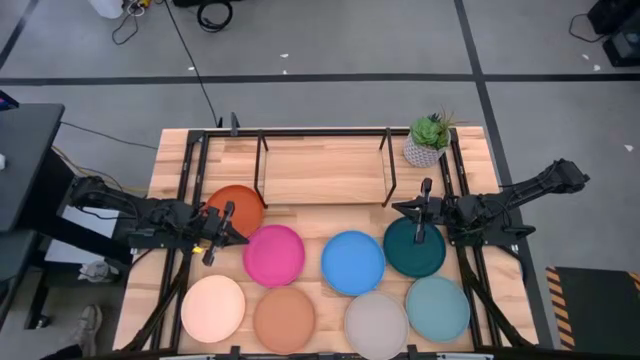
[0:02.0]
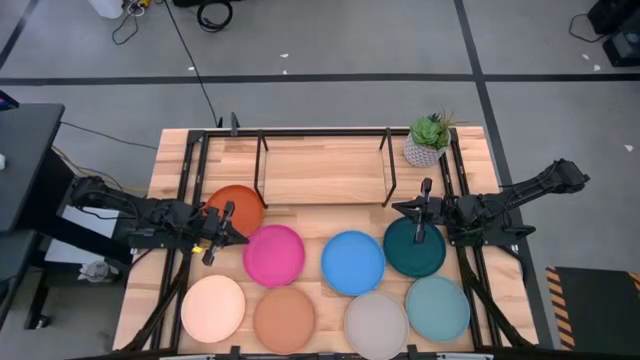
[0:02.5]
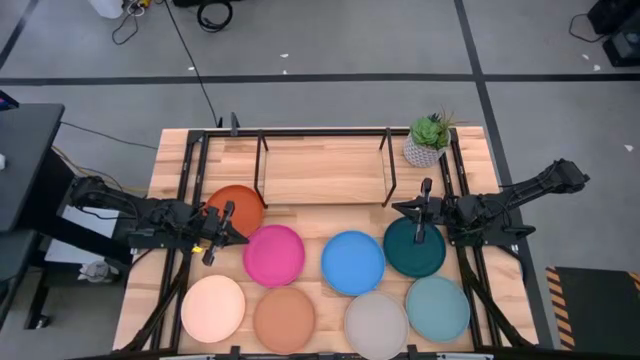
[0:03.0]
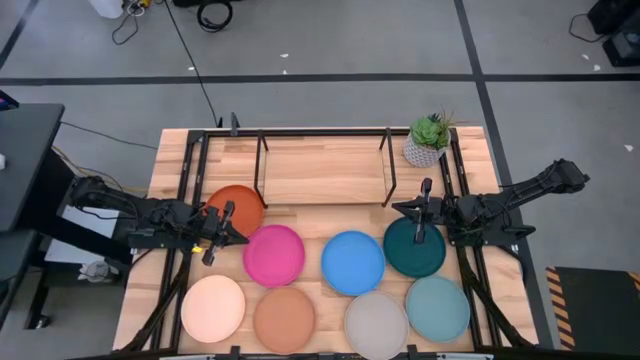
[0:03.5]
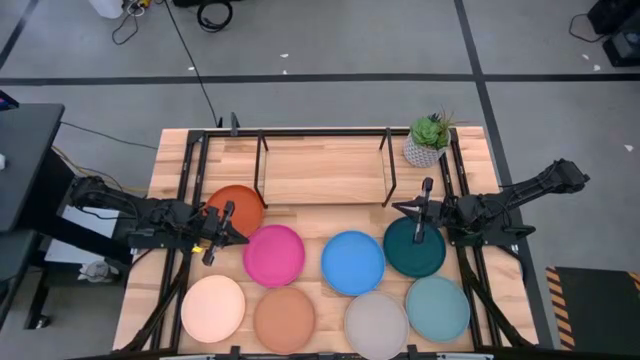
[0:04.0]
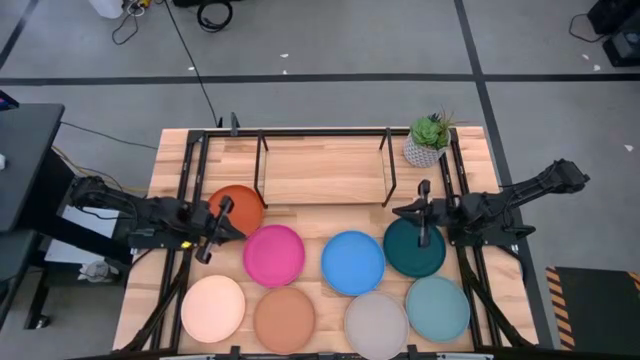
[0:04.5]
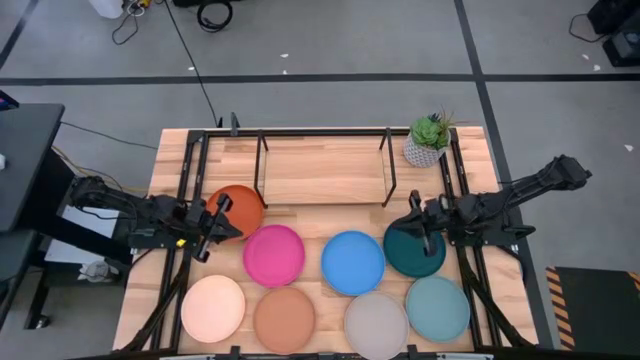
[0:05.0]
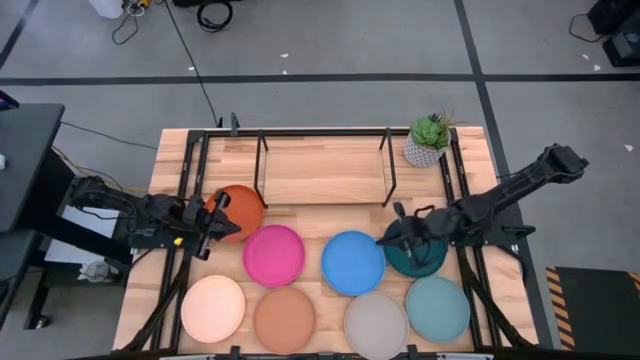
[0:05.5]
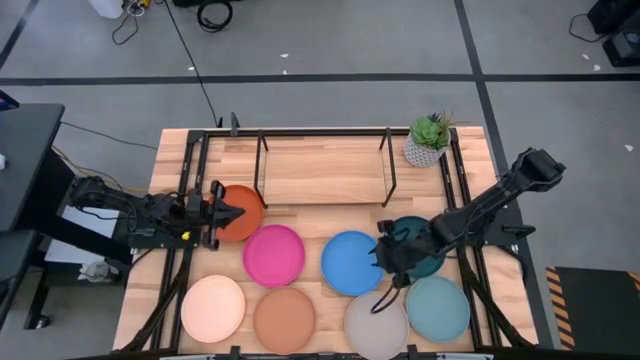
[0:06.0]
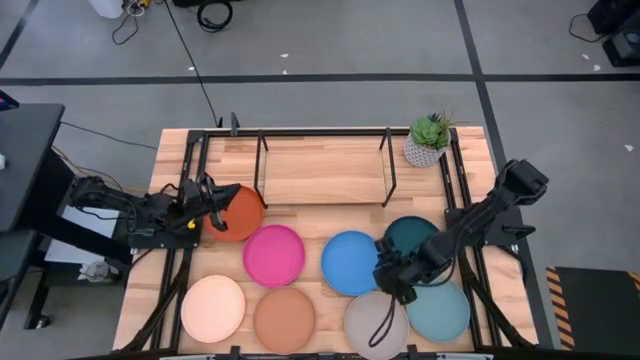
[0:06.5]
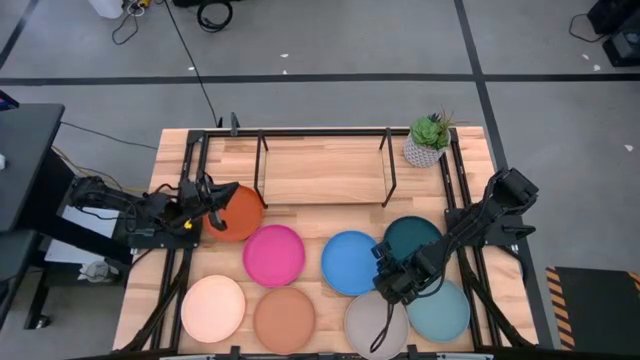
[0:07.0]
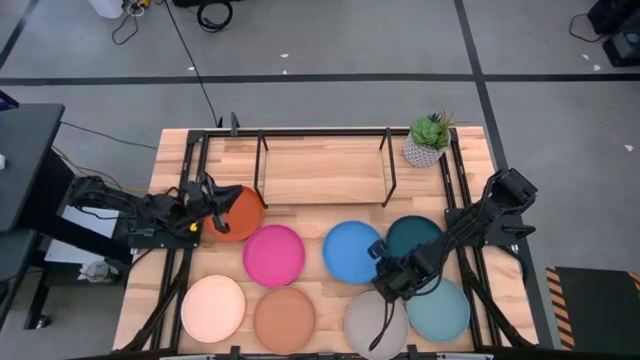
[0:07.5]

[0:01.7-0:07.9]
Task: Place and stack plates onto a shelf
Put the blue plate on the shelf

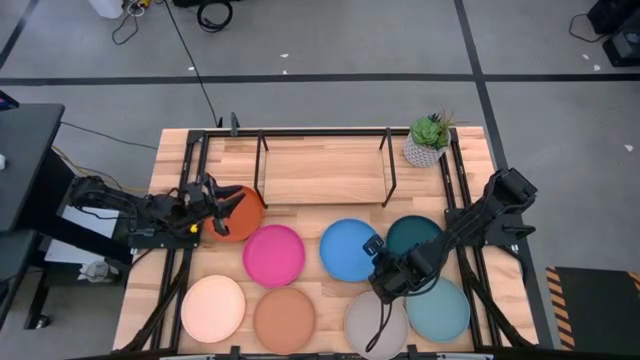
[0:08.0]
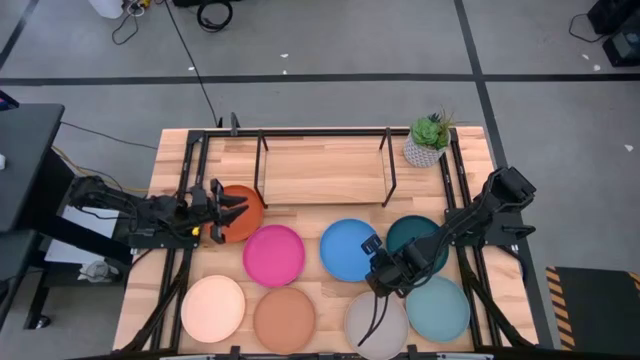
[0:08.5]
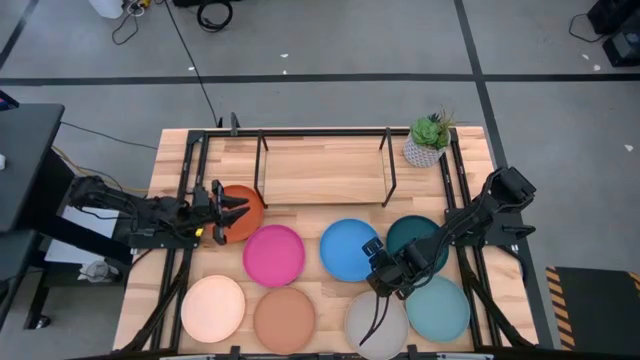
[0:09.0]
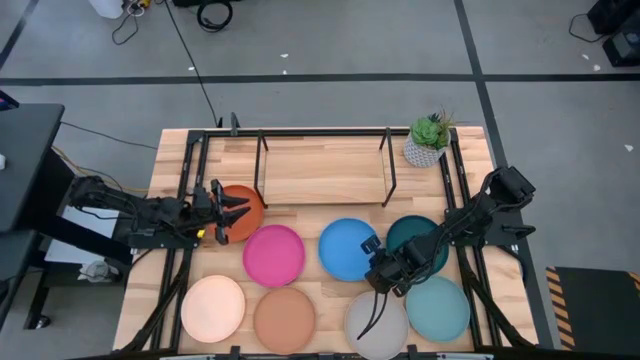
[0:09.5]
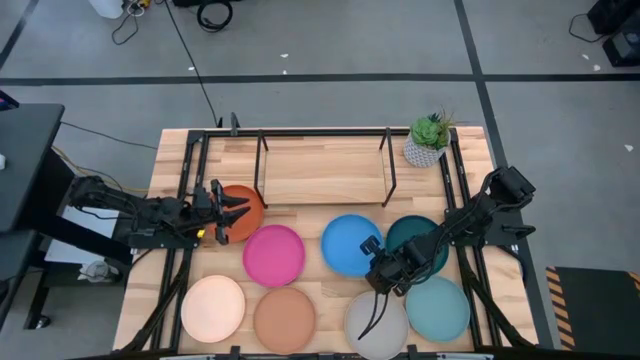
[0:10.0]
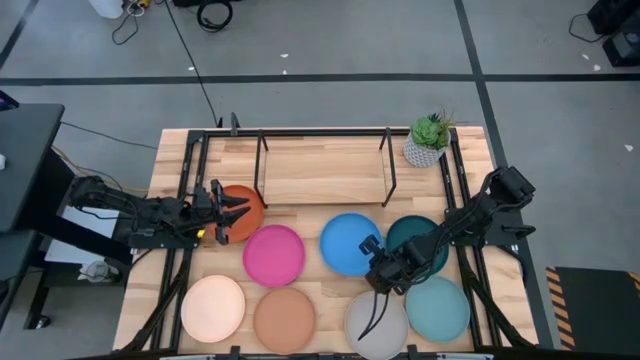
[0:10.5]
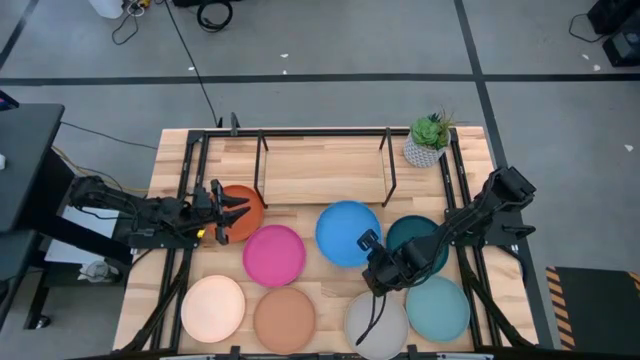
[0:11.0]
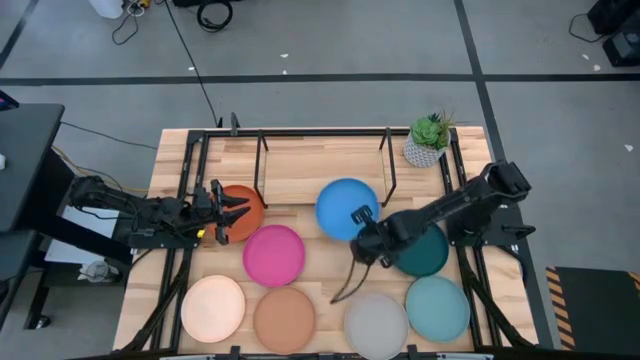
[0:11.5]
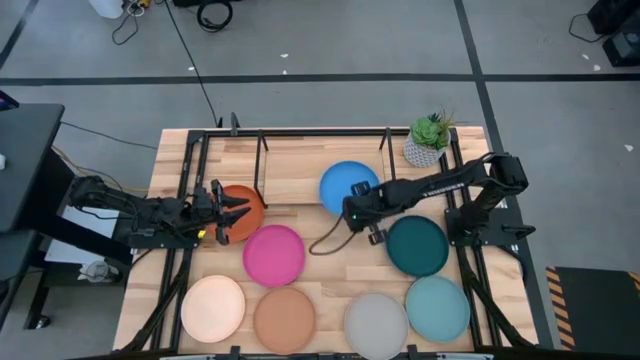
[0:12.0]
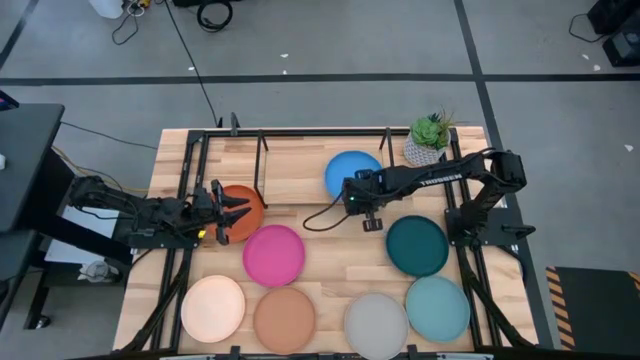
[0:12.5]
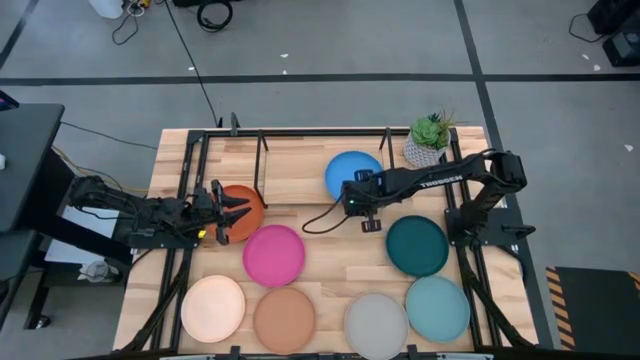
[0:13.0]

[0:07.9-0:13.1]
Put the blue plate on the shelf

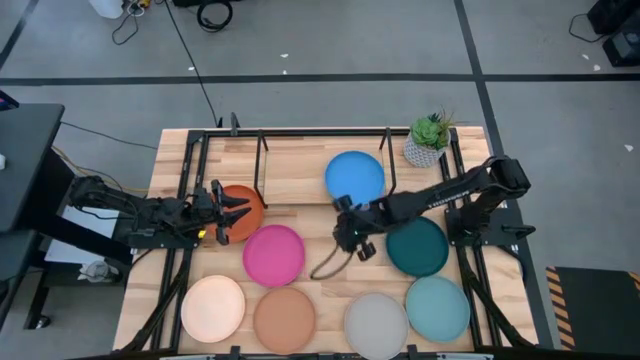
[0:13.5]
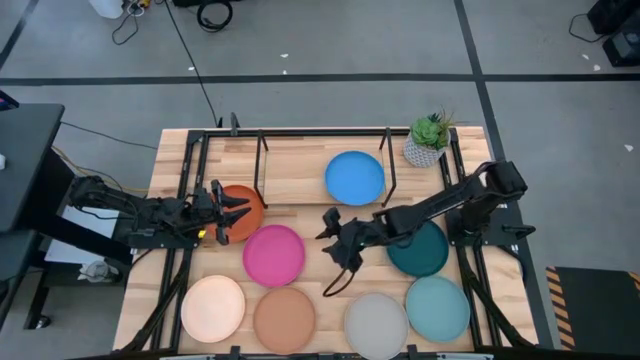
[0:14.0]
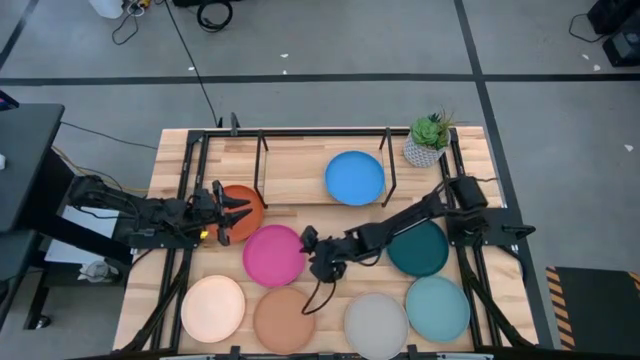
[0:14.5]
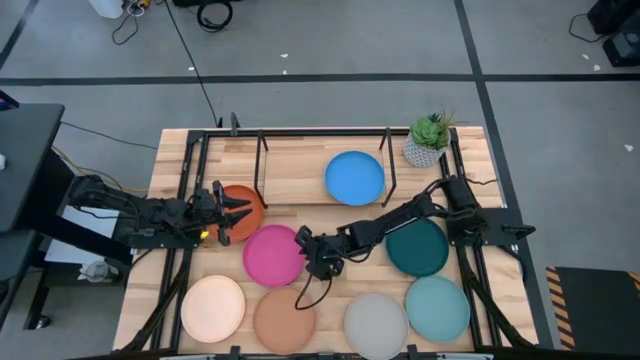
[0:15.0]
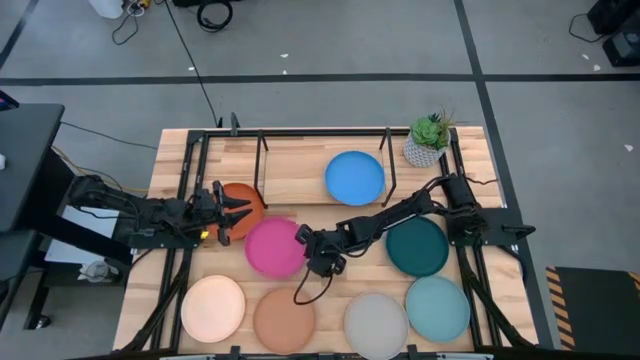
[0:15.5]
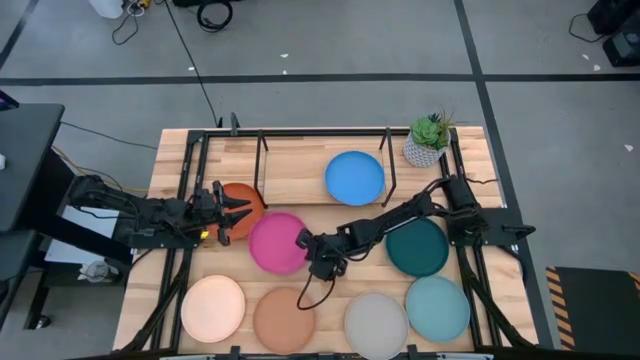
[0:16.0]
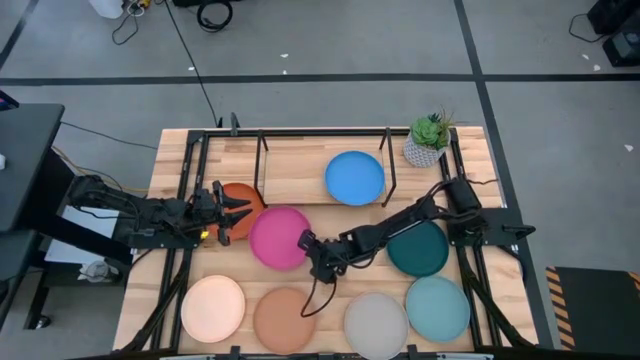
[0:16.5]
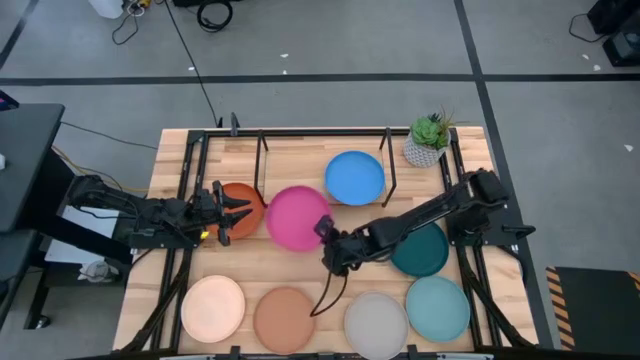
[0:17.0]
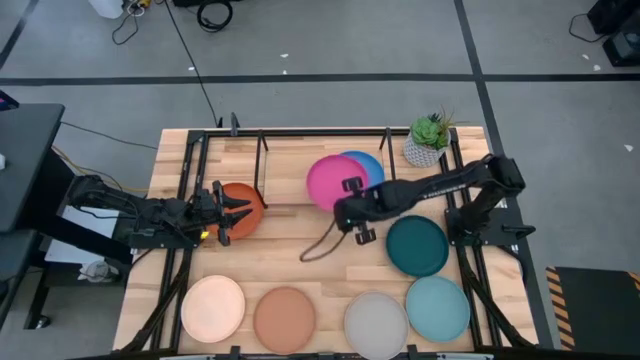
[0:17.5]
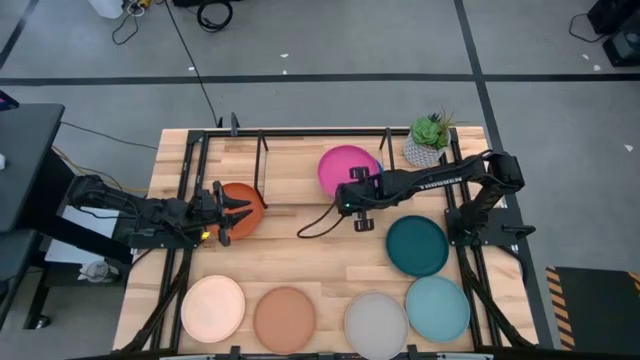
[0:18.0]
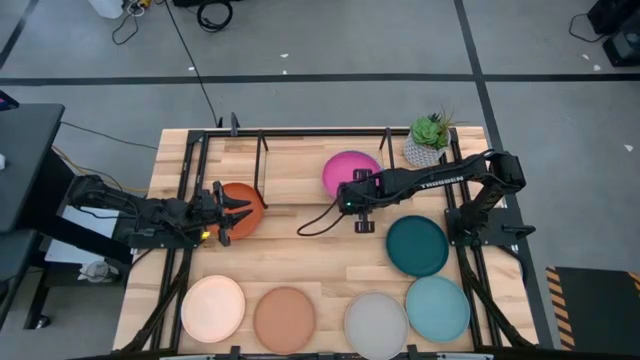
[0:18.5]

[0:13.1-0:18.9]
Stack the pink plate on top of the blue plate on the shelf

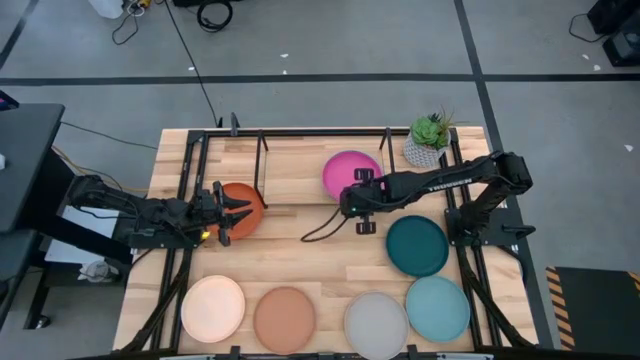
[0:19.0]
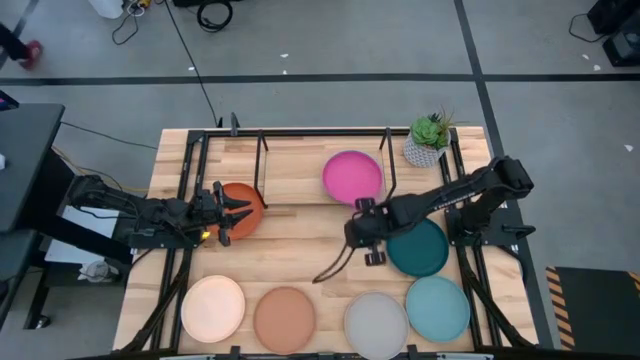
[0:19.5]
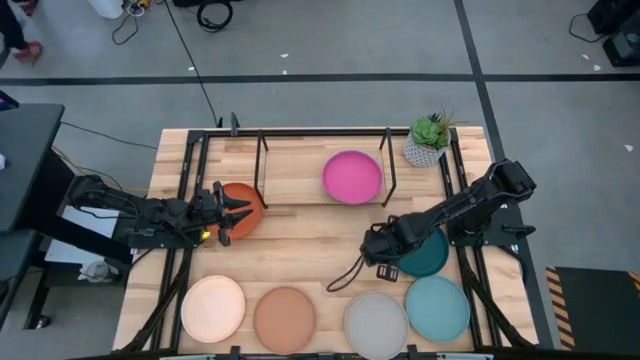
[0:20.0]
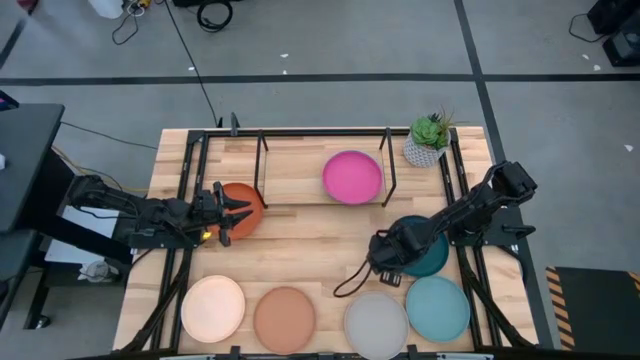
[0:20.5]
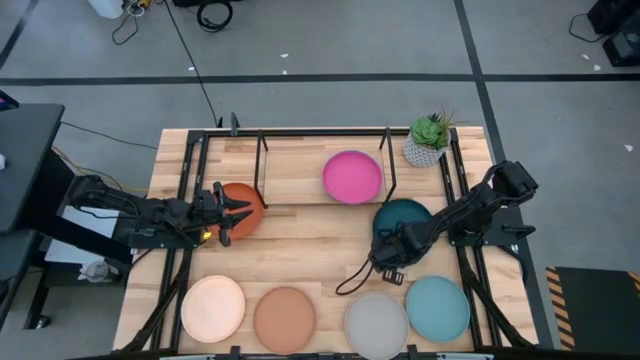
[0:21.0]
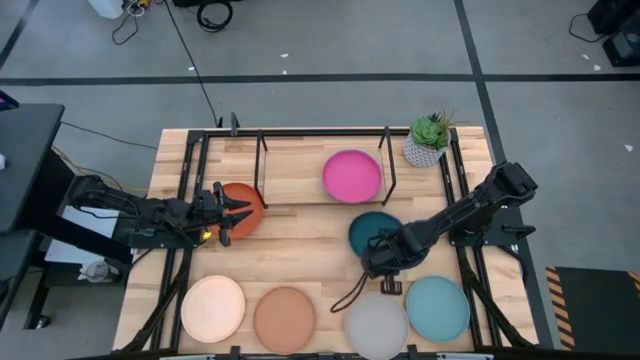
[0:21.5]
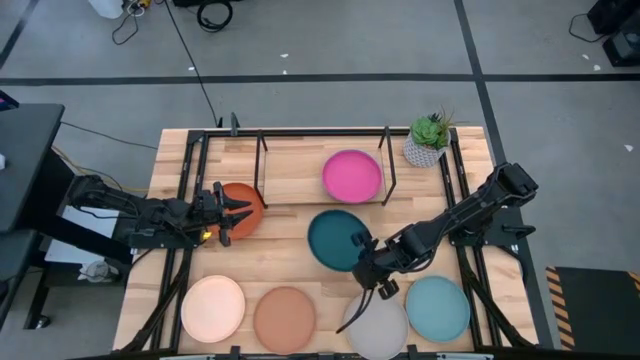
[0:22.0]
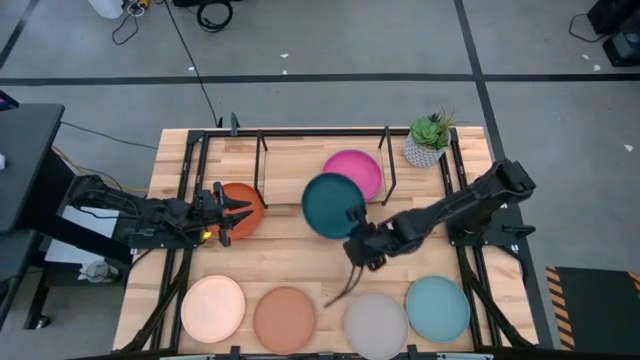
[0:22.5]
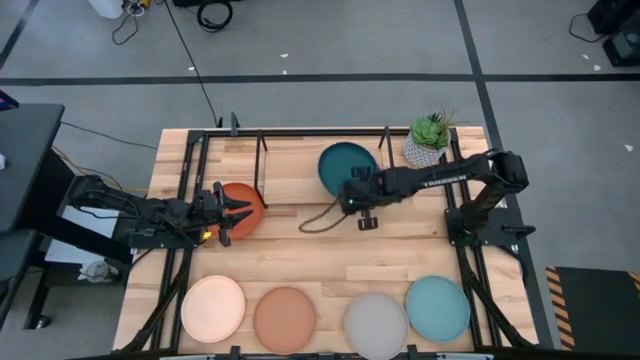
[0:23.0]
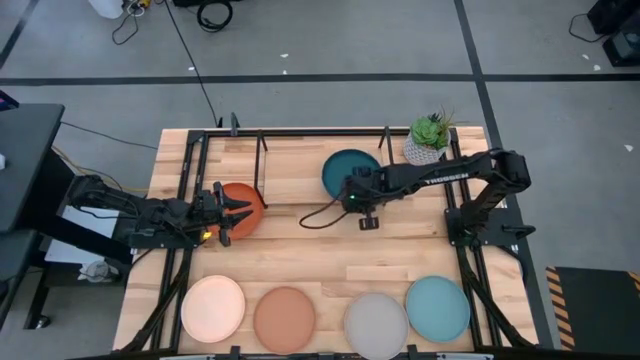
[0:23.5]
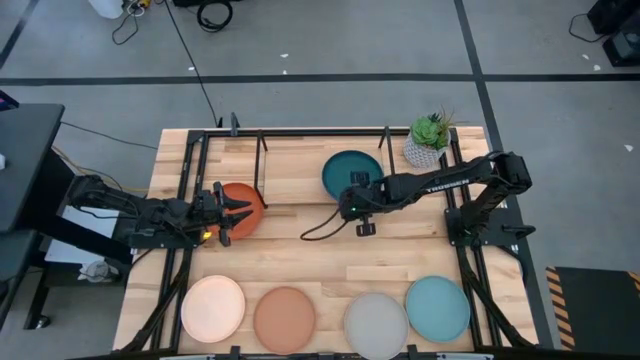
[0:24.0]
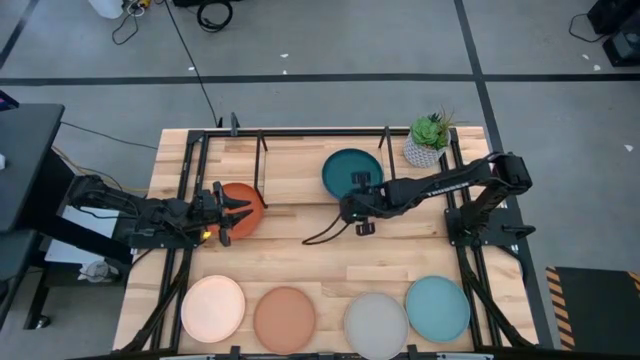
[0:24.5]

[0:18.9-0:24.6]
Stack the green plate on top of the pink plate on the shelf
